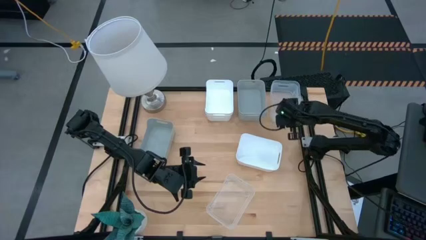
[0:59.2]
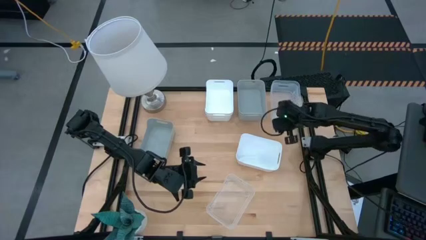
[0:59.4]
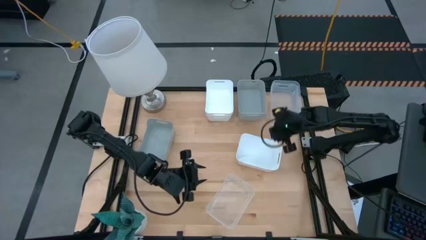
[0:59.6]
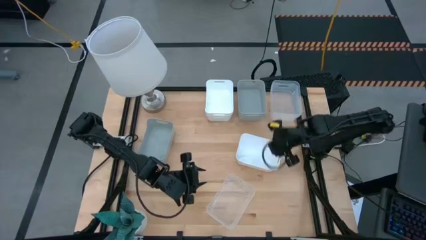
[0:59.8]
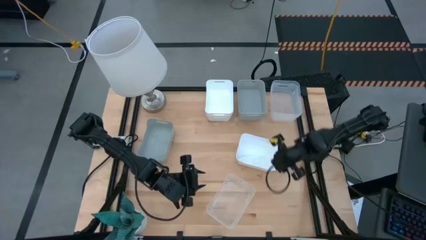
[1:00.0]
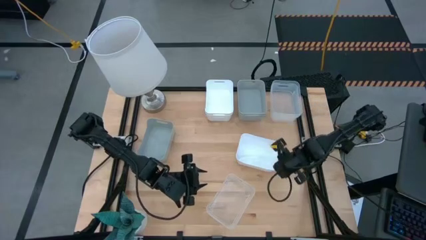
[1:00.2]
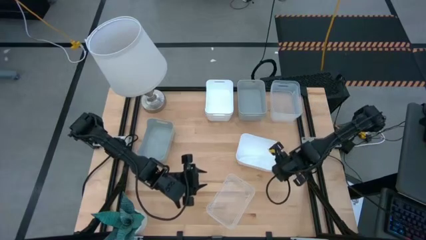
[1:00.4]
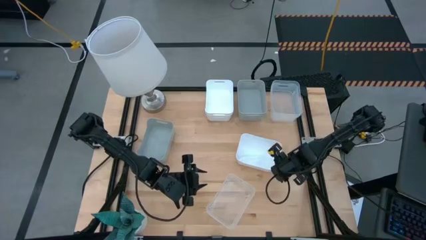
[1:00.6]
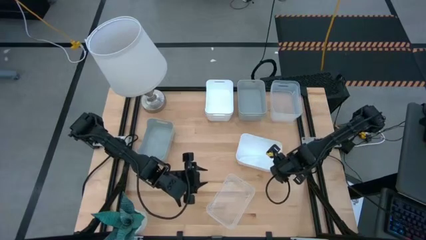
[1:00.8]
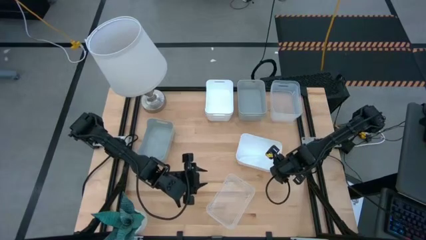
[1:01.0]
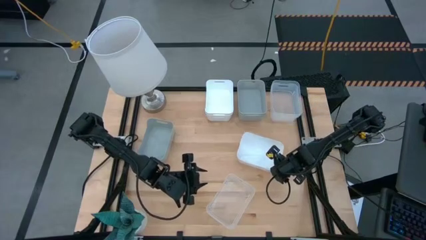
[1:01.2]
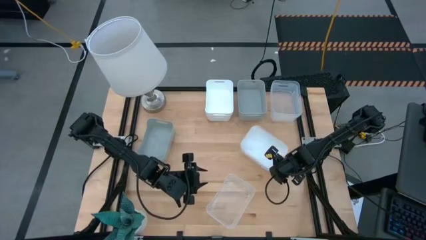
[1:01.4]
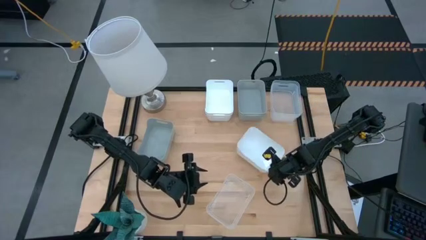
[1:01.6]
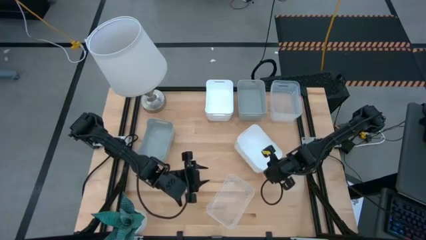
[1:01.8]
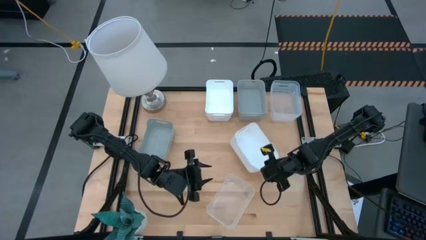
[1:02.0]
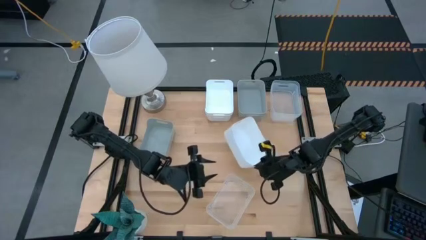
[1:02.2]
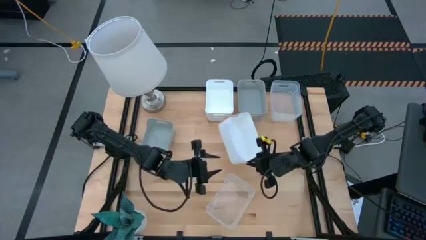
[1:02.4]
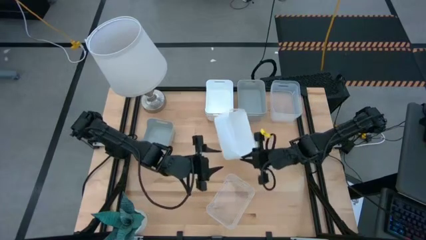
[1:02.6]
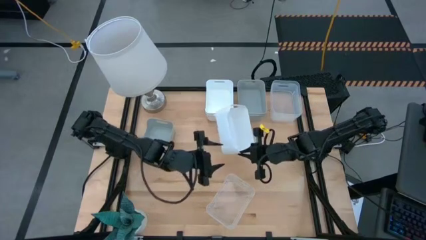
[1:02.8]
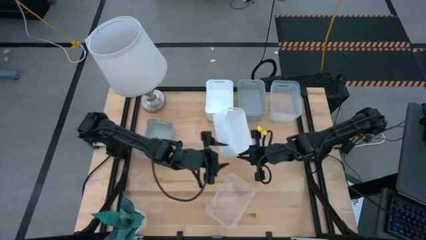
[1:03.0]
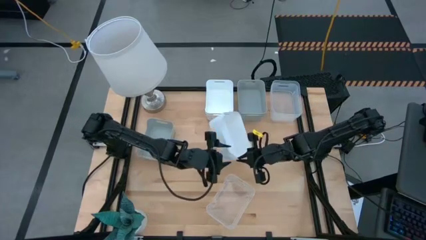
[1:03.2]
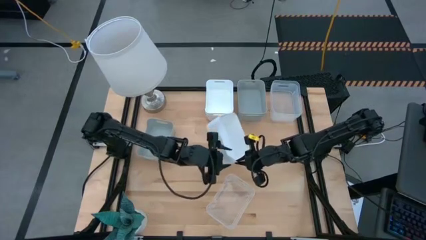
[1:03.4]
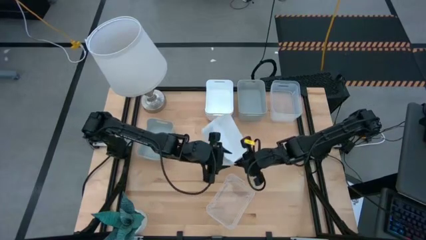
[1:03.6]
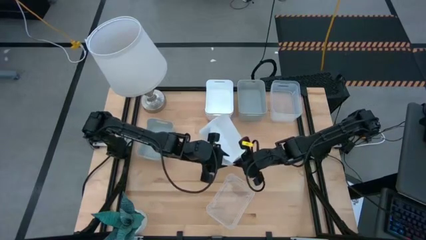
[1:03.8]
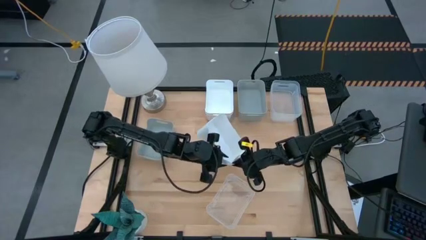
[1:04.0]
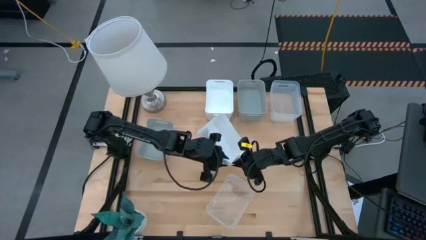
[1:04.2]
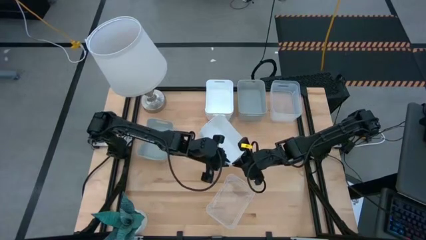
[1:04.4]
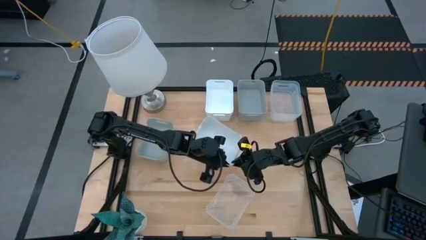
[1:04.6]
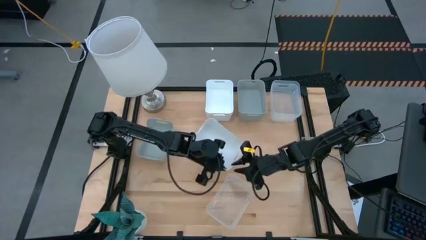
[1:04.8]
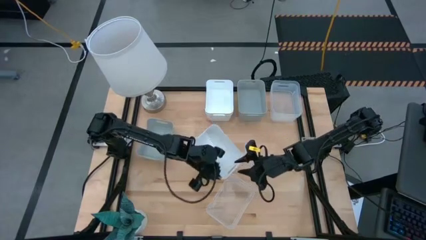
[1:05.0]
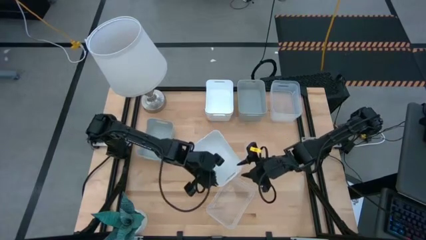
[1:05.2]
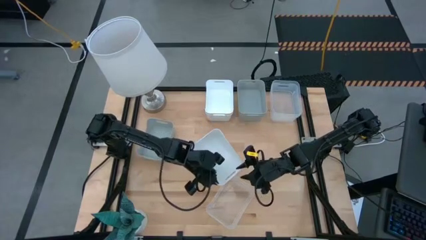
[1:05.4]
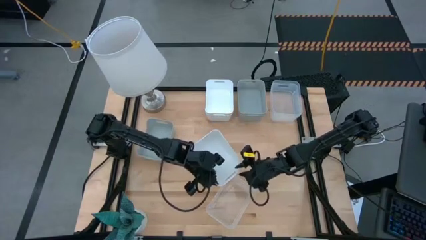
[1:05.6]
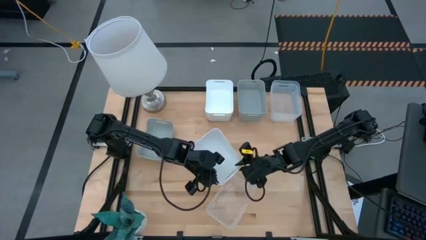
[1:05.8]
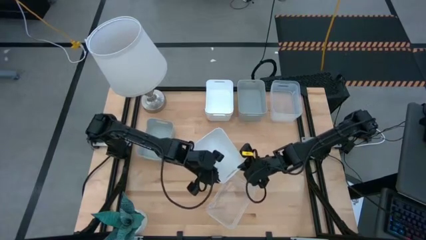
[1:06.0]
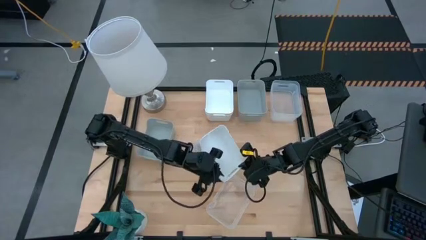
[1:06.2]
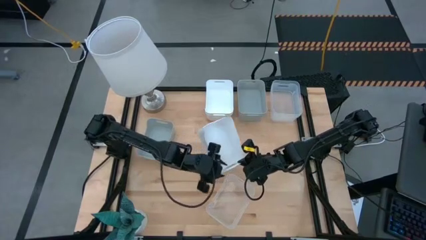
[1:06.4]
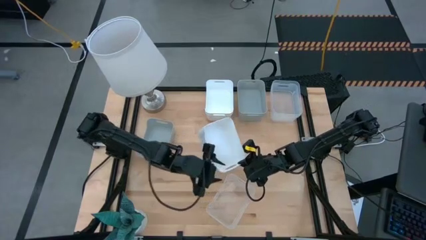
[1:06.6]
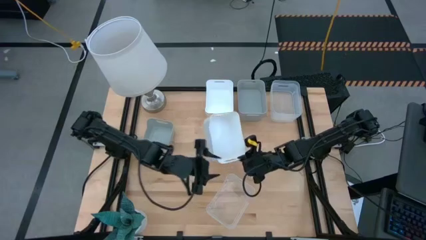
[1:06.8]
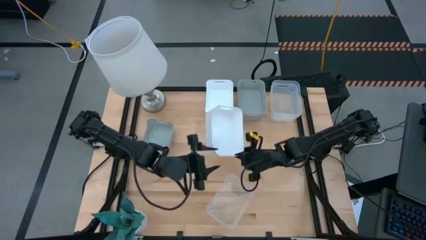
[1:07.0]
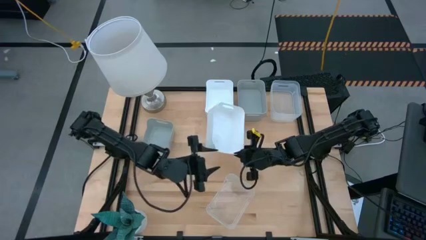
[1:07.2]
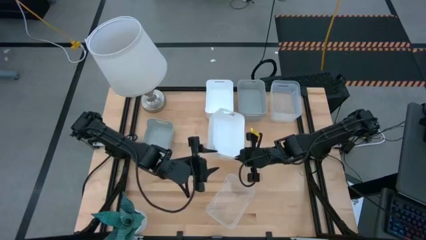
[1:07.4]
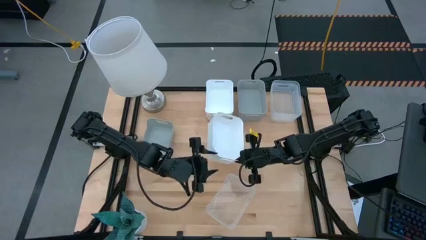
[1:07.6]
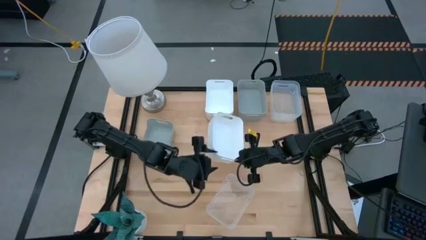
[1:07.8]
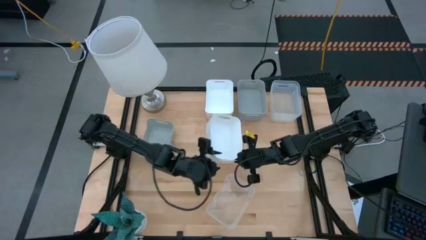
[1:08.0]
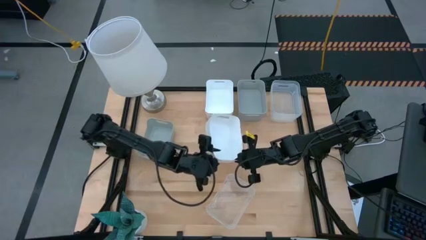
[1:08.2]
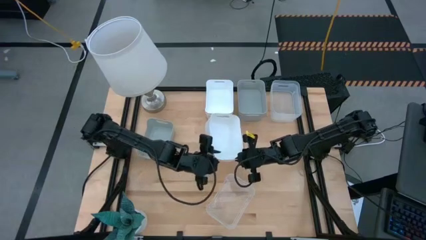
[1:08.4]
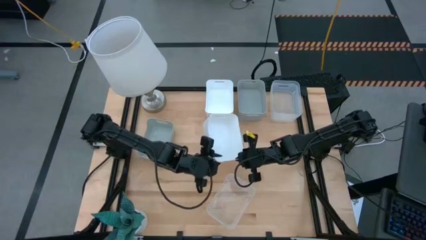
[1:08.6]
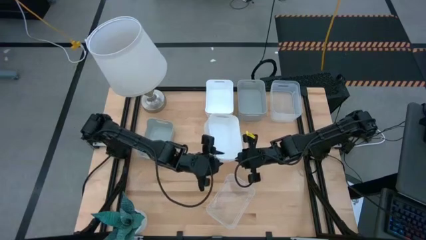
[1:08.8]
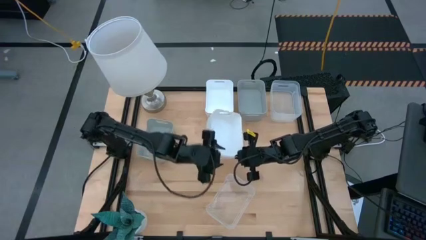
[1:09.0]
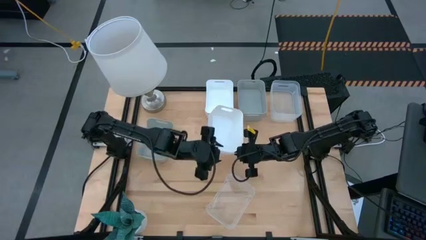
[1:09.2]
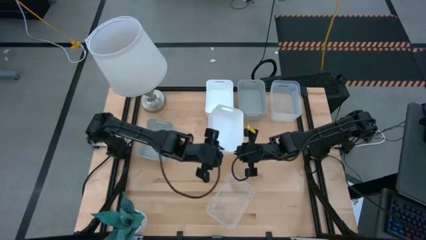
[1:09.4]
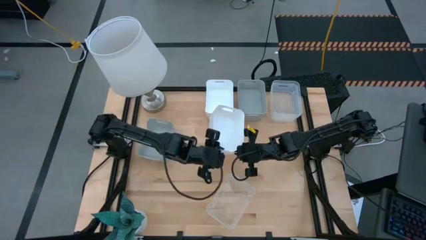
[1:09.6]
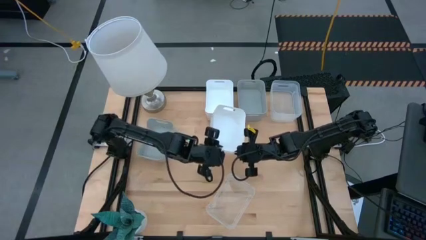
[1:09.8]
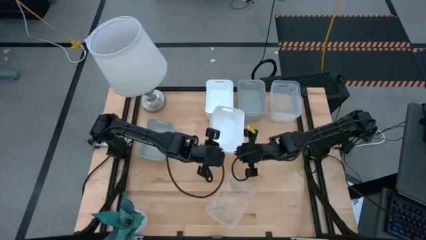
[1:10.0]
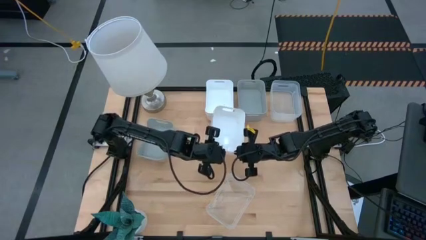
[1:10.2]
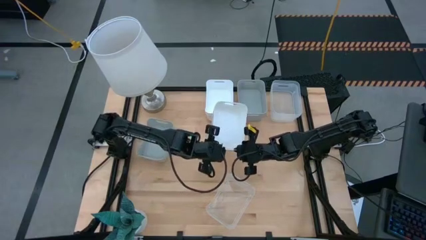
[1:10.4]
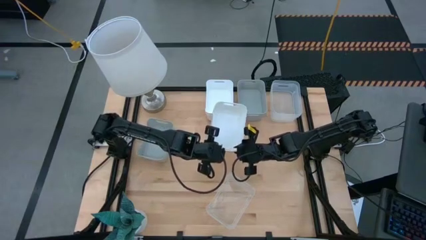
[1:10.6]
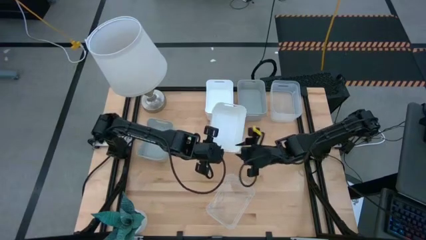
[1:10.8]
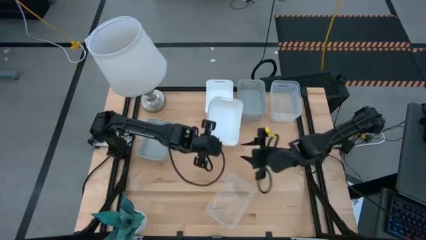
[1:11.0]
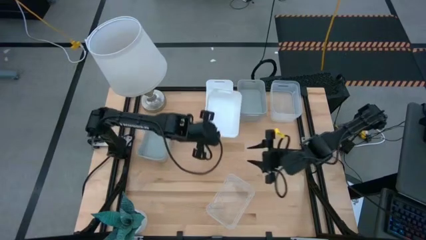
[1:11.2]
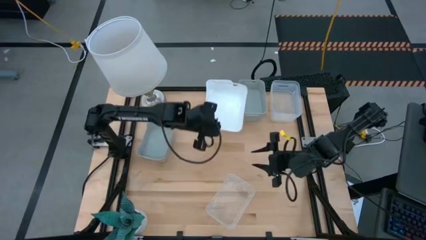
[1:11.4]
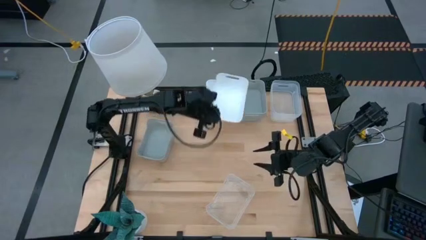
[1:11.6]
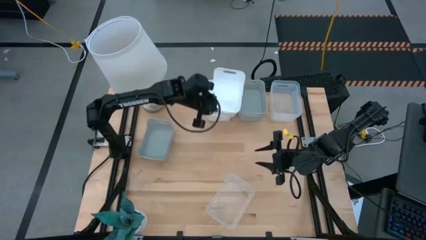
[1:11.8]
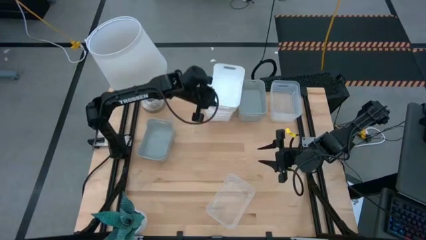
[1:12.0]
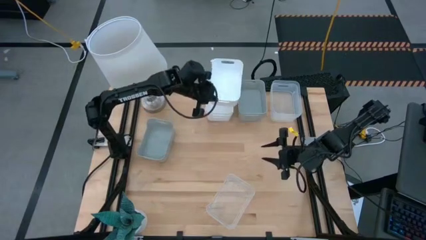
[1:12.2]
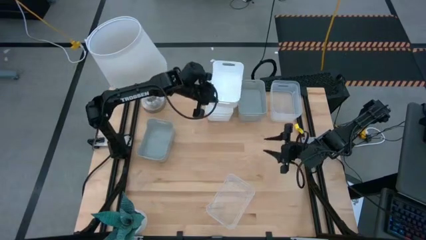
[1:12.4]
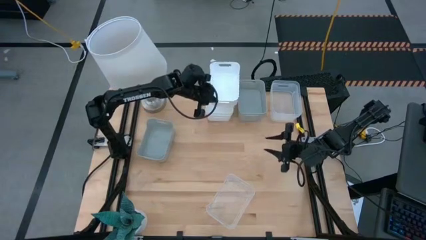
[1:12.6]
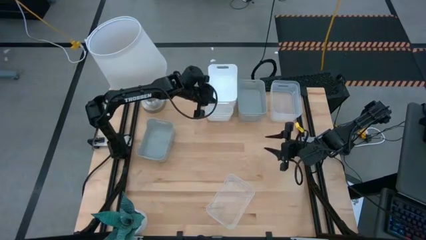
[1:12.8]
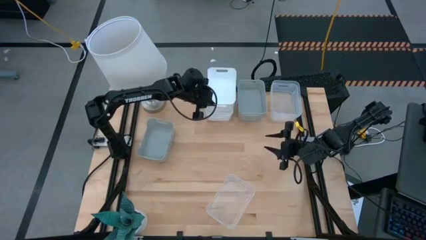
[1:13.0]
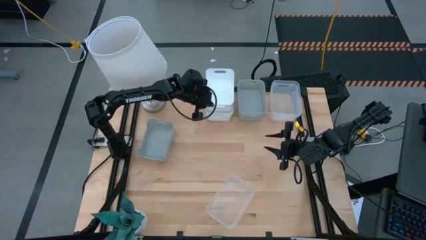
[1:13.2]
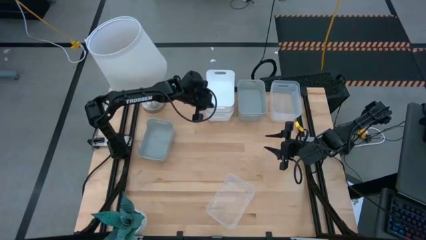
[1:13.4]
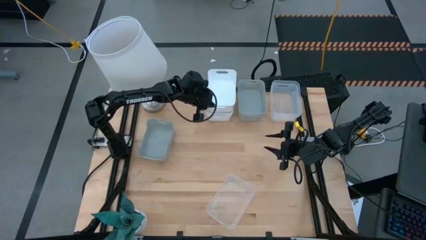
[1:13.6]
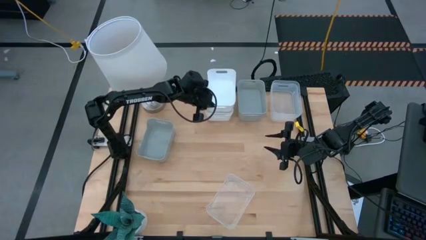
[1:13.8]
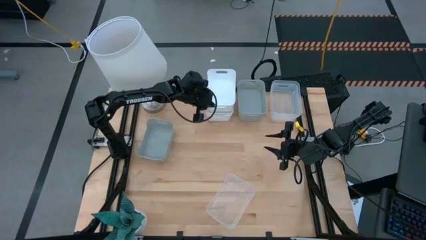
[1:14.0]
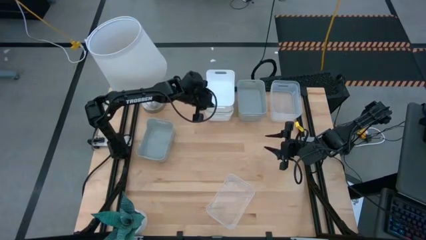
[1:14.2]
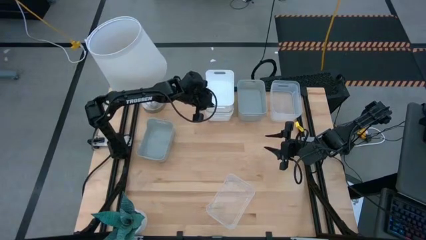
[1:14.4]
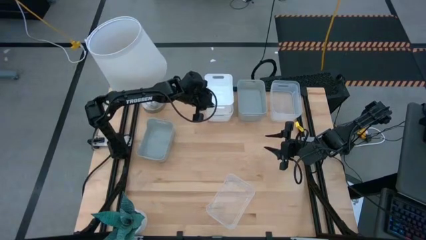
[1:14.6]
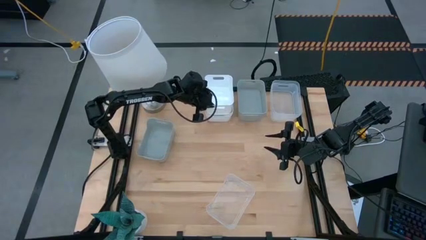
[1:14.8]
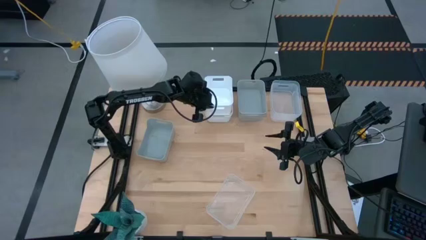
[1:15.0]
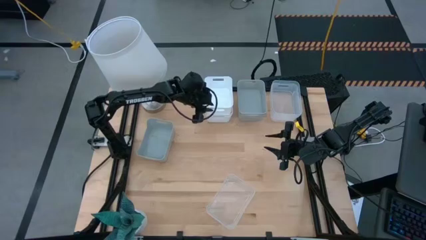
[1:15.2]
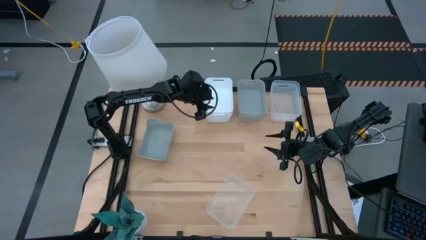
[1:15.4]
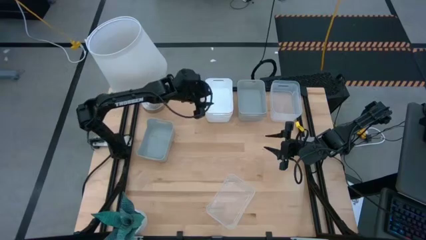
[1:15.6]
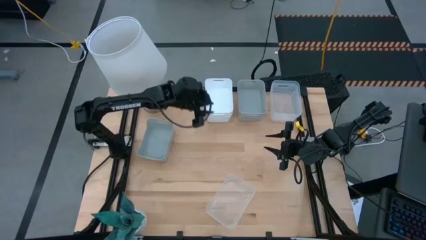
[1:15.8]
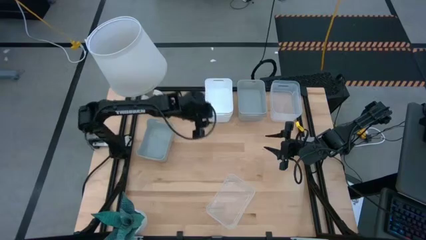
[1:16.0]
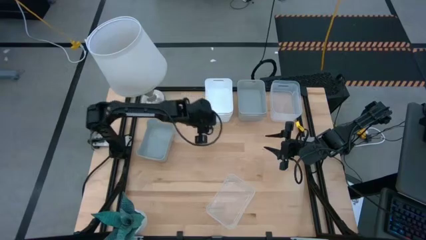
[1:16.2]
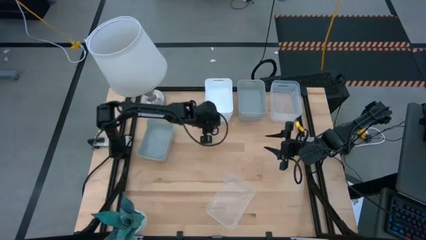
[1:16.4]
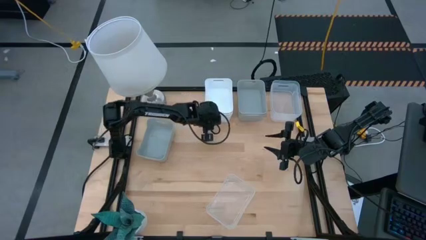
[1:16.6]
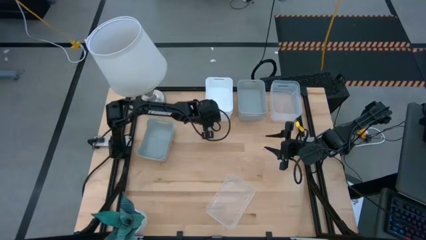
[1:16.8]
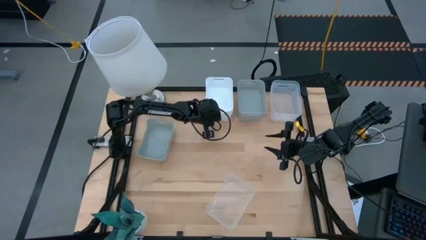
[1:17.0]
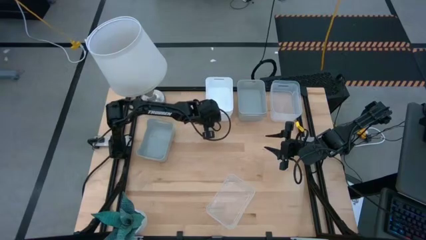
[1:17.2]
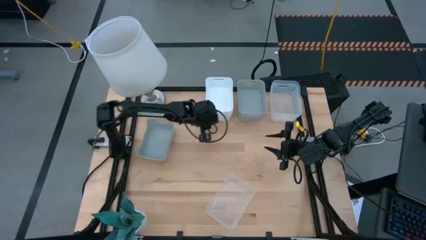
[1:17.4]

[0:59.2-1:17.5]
Stack the bottom white bin on top of the top white bin
